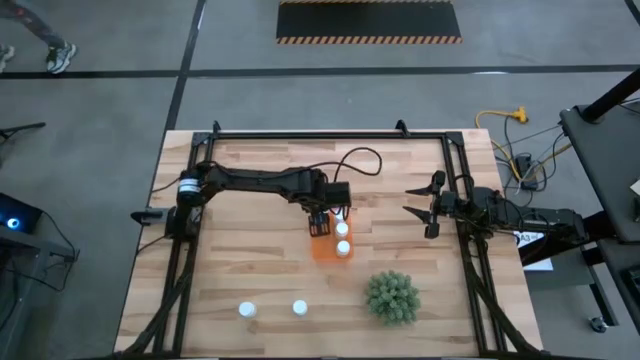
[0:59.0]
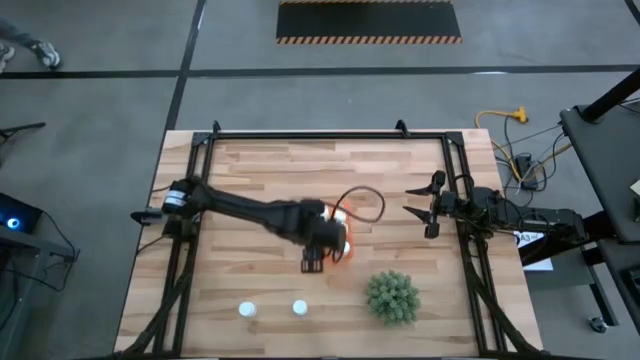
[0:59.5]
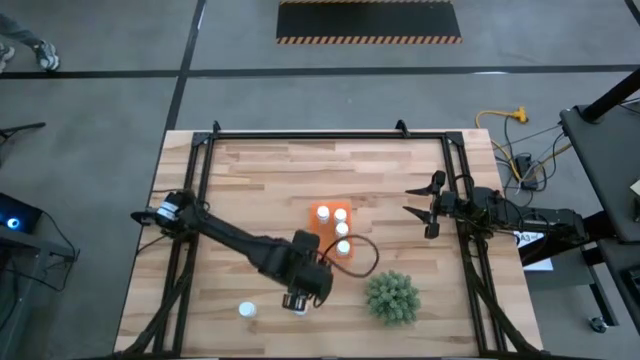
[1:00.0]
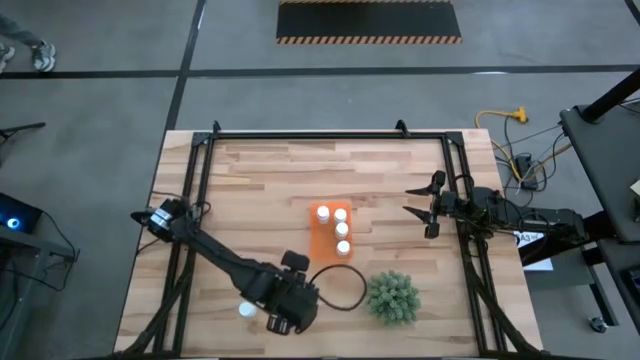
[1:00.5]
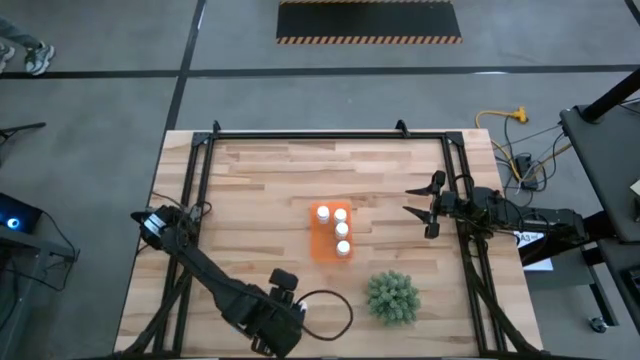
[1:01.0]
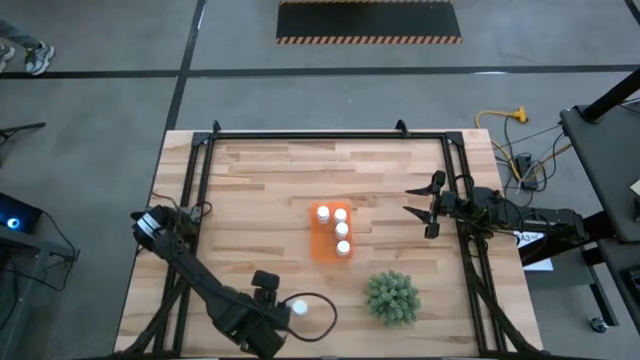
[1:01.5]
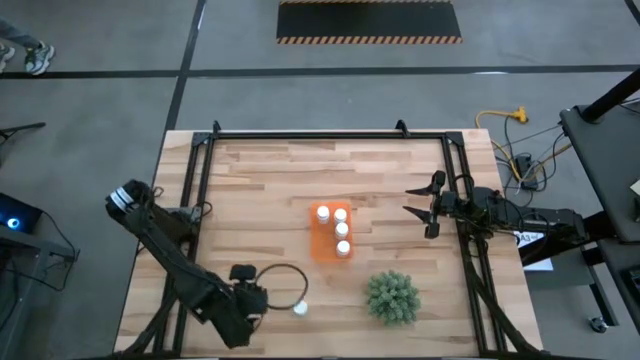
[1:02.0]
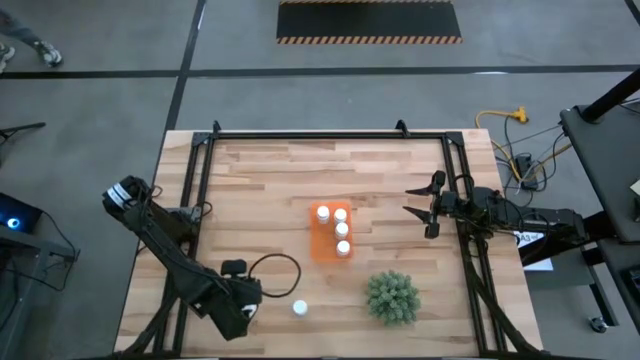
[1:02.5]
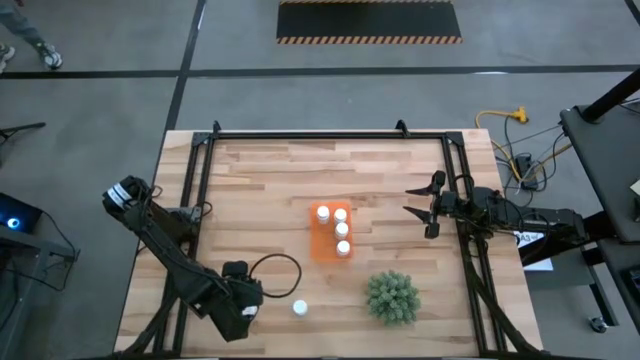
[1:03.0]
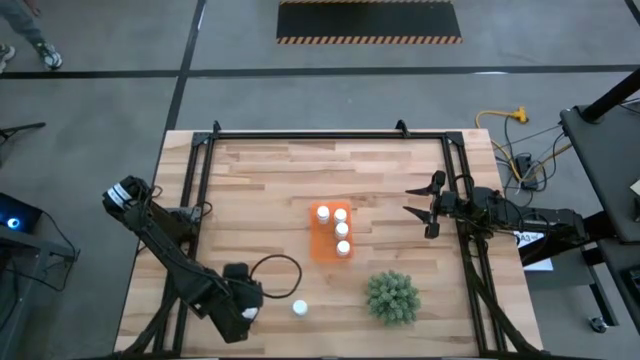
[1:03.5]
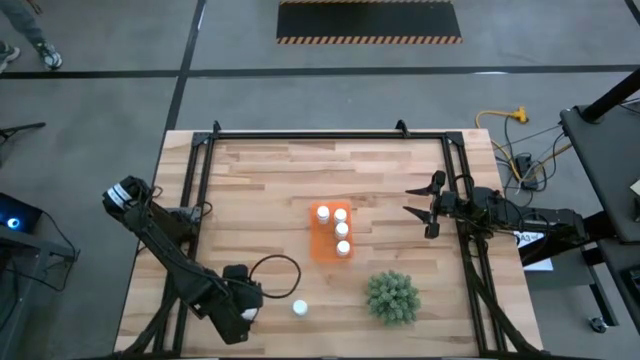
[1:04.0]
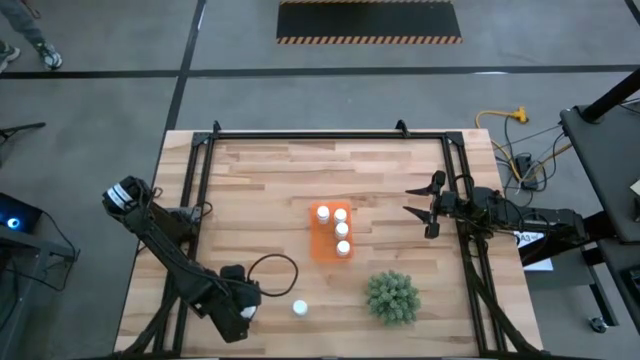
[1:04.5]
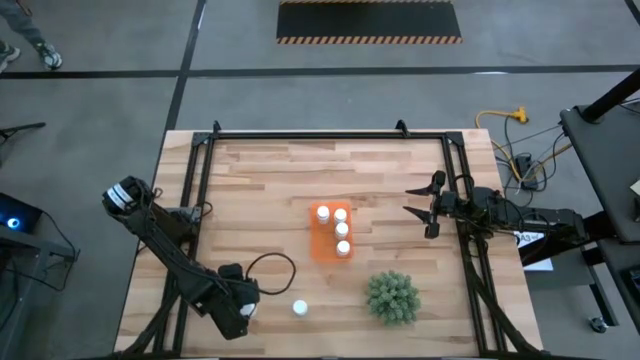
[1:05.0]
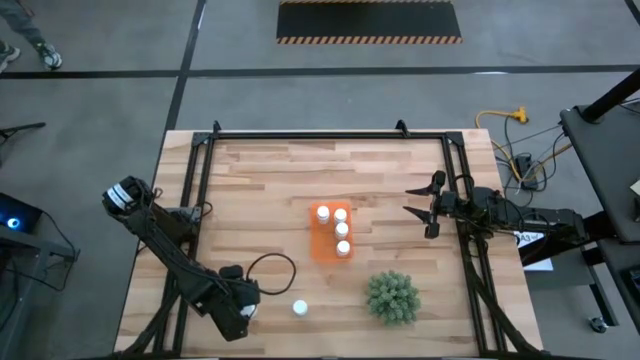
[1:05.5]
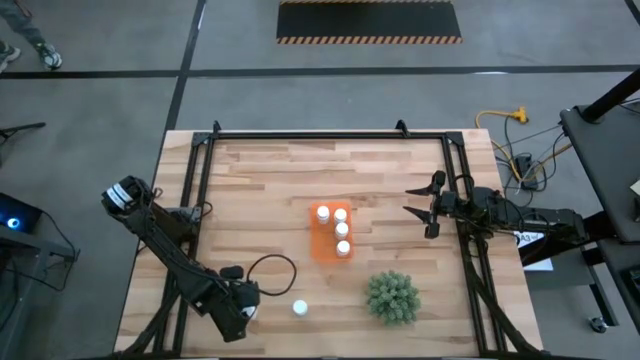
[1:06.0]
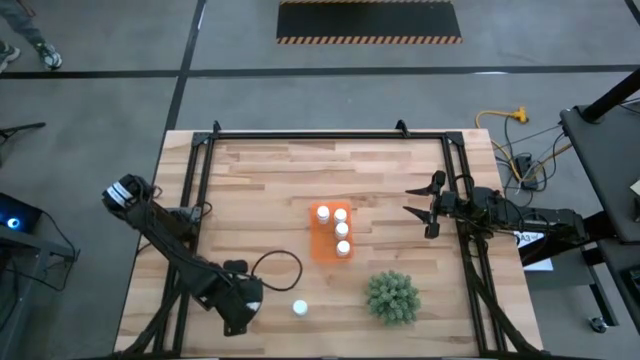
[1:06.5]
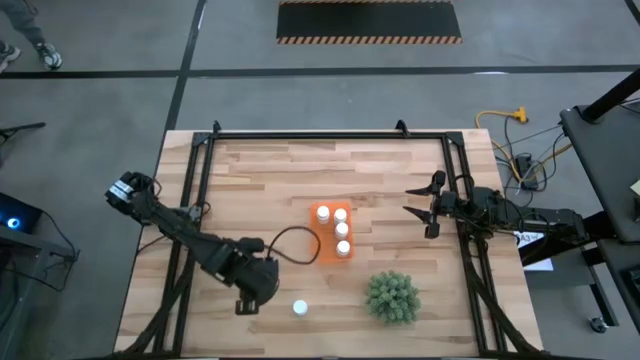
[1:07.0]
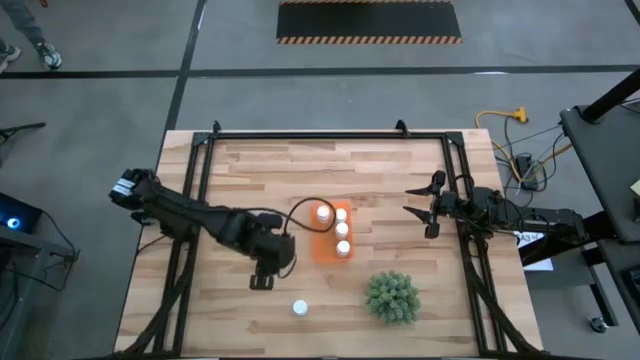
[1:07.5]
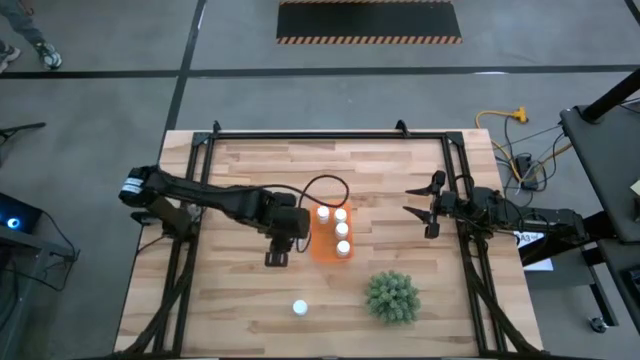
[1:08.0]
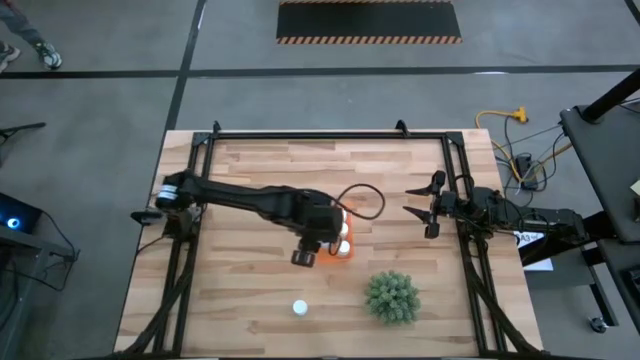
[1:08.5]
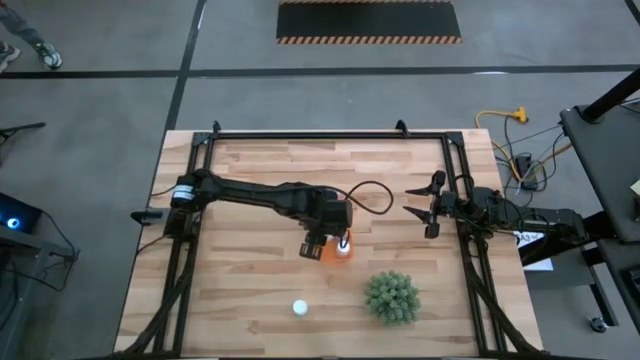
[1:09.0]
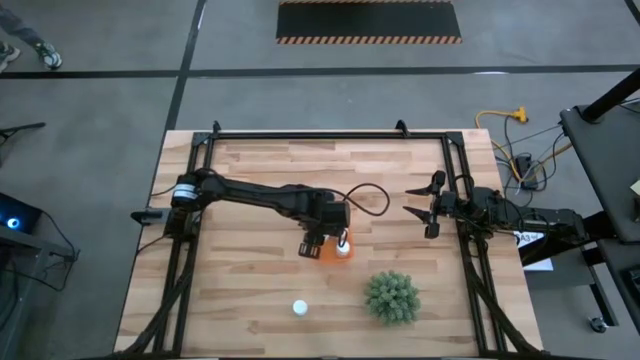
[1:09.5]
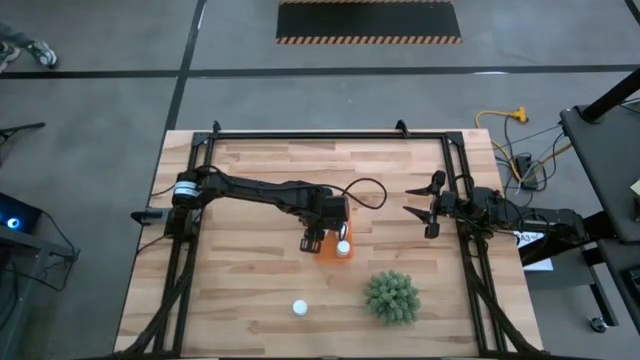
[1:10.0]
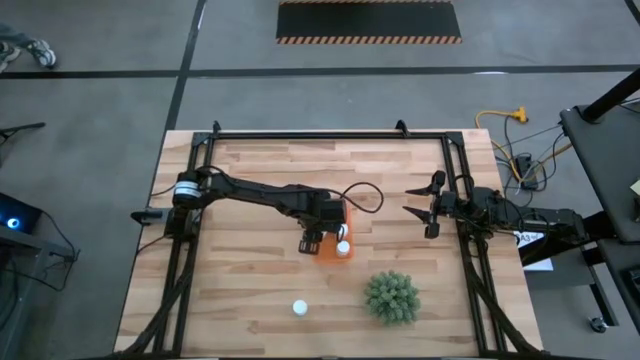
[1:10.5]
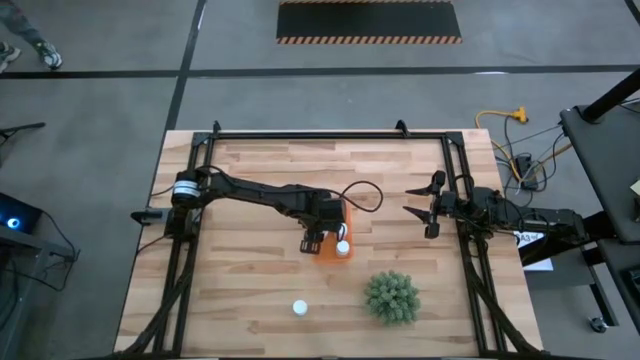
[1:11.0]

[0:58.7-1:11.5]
Task: Pick and place pill bottles into a basket
Put the white pill bottle into the orange bin

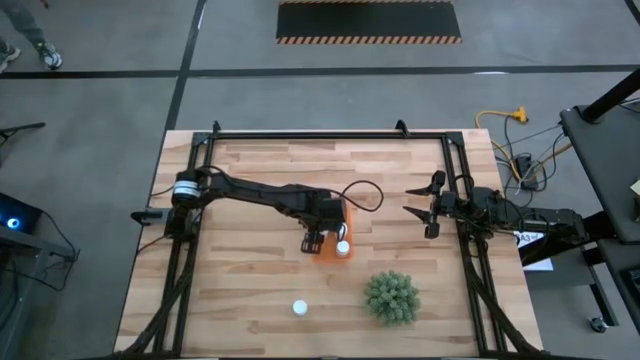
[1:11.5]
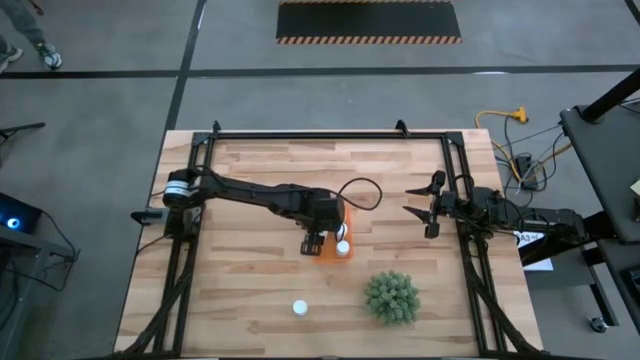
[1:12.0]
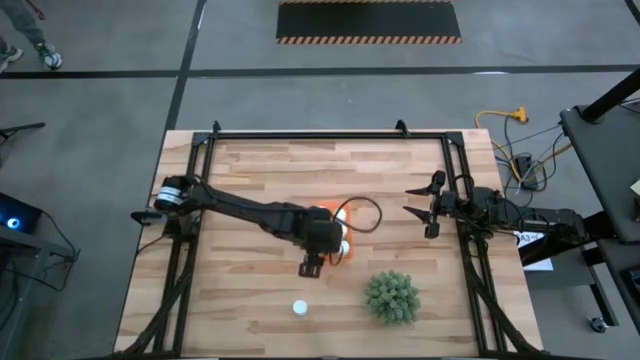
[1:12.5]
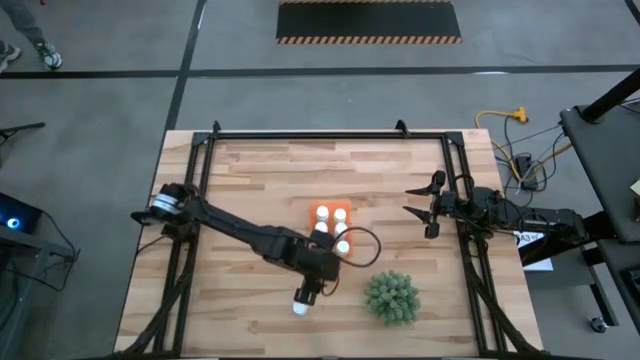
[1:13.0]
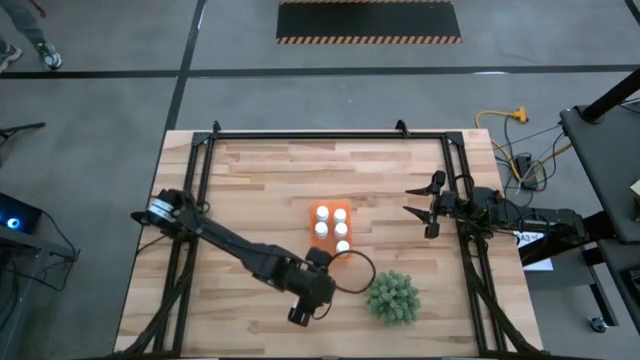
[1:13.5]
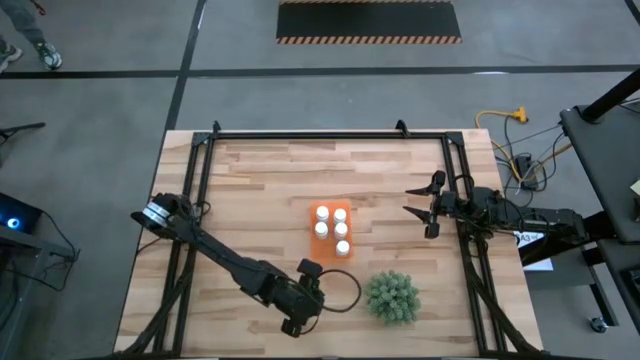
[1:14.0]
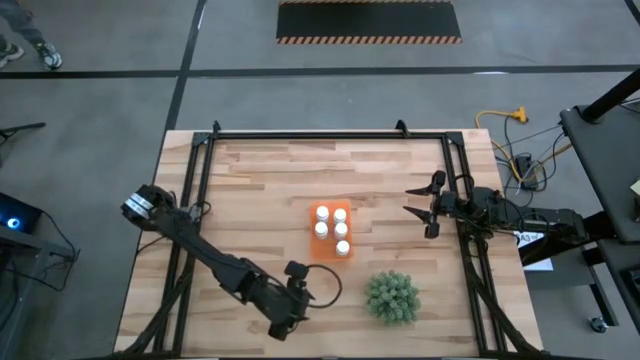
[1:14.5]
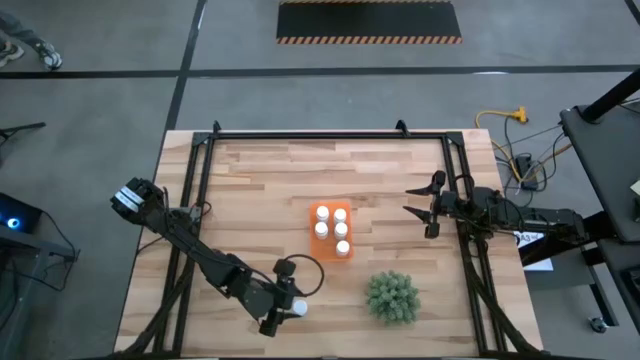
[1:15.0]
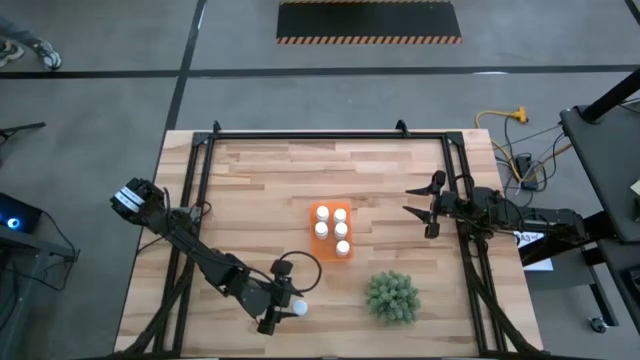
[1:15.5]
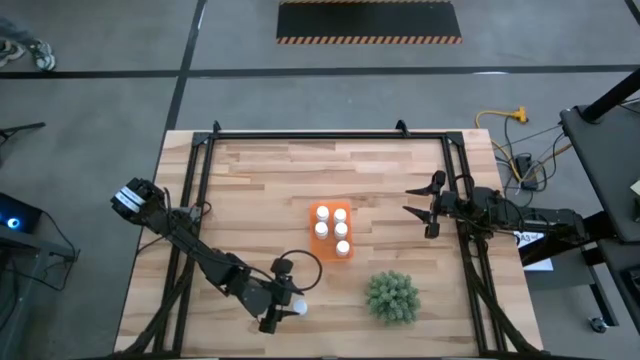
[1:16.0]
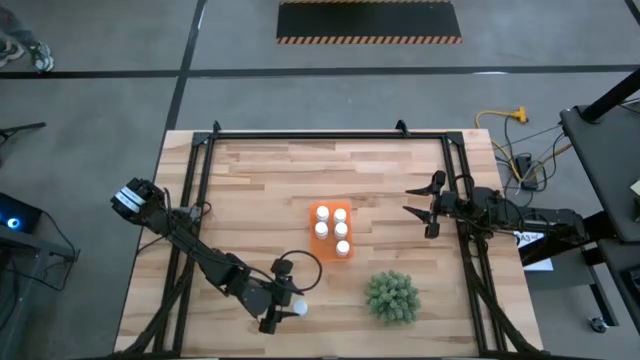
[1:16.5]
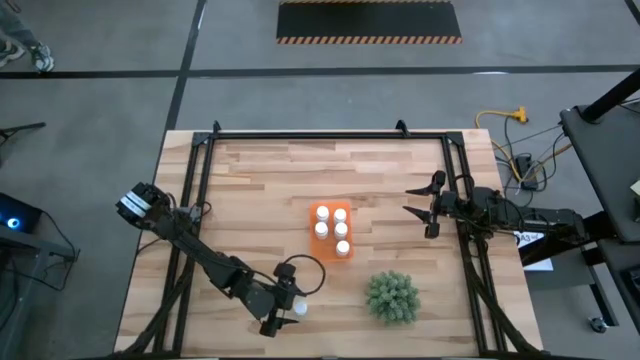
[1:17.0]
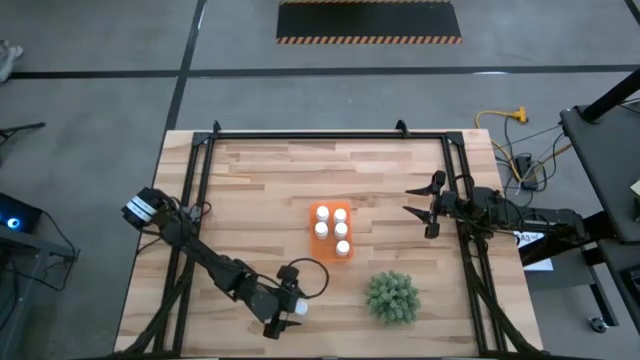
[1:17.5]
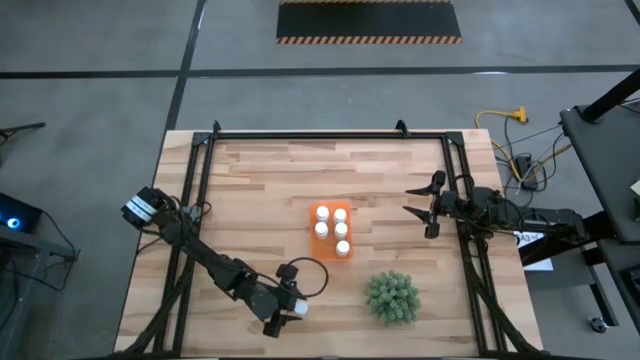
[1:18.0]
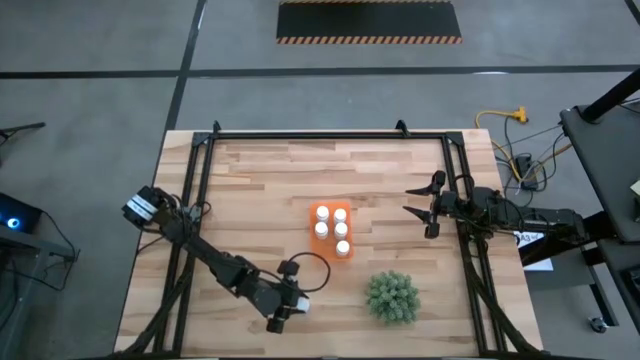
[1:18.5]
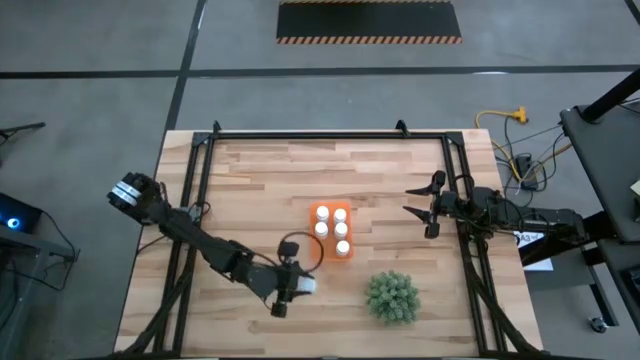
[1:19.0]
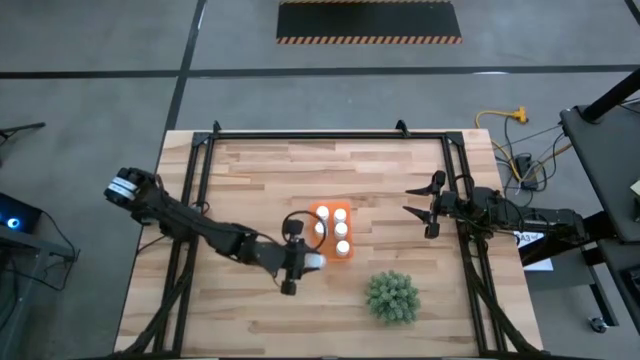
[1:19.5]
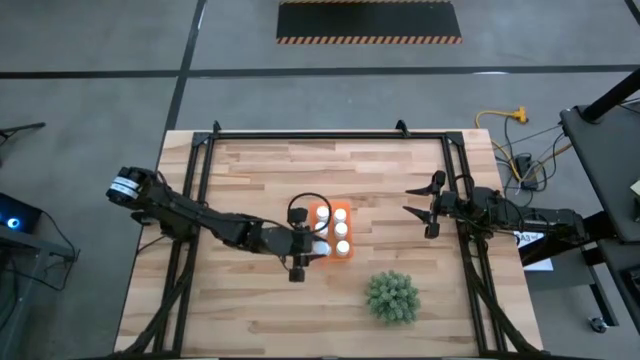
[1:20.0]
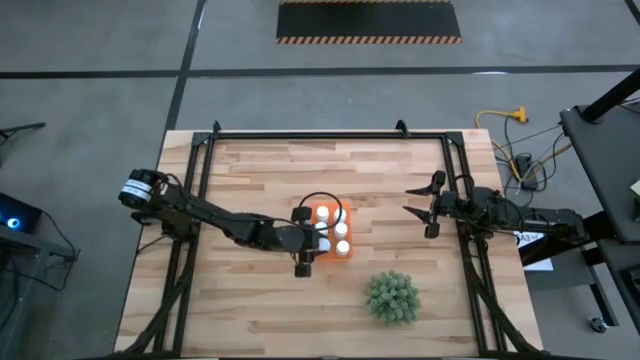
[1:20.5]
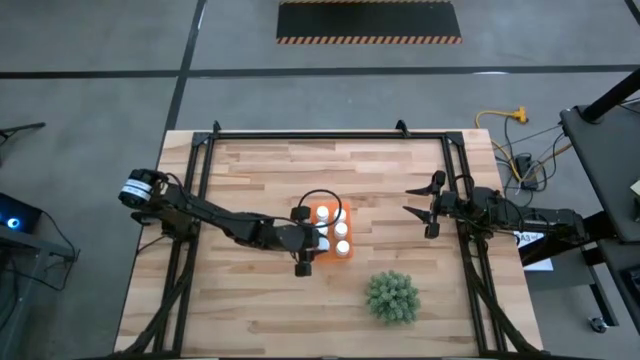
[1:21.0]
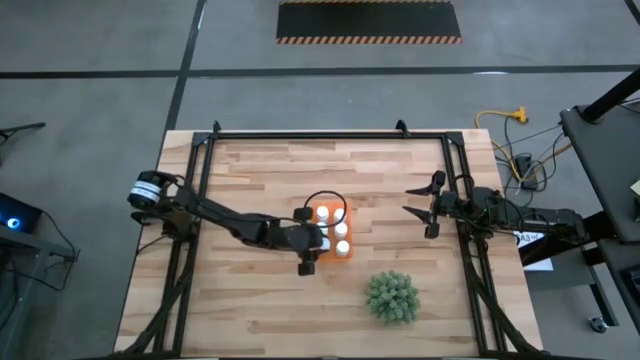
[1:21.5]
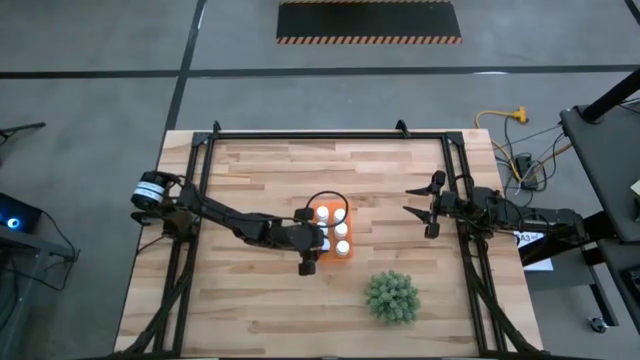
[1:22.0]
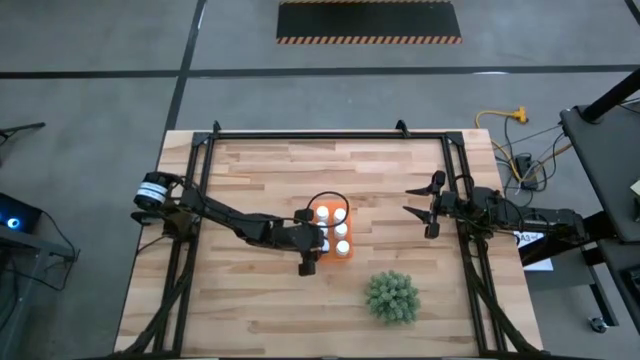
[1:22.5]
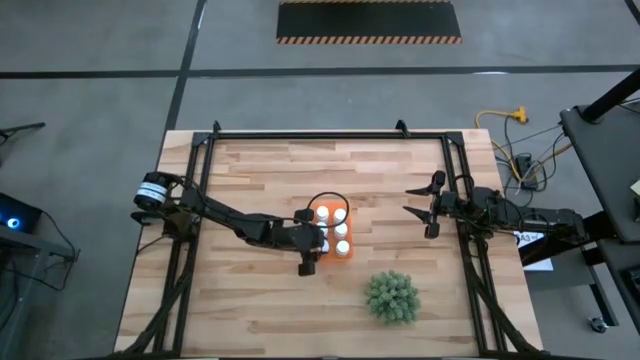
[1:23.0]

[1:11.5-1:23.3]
Put the white pill bottle into the orange bin
